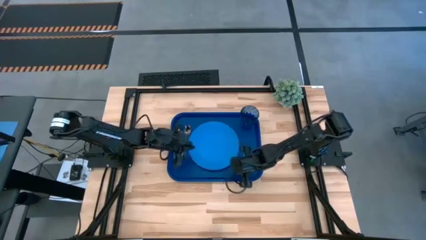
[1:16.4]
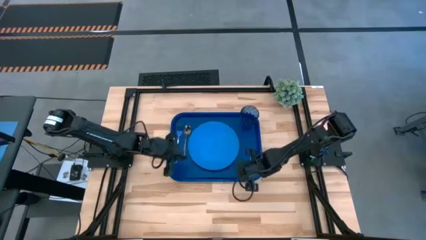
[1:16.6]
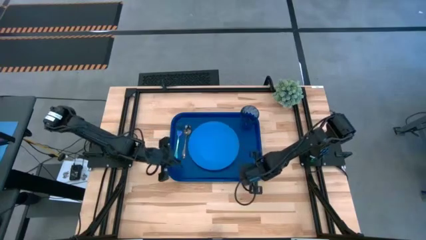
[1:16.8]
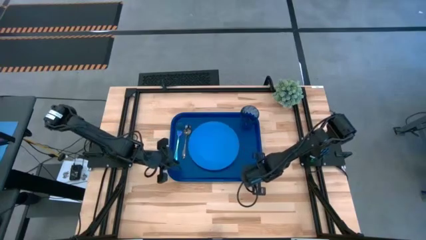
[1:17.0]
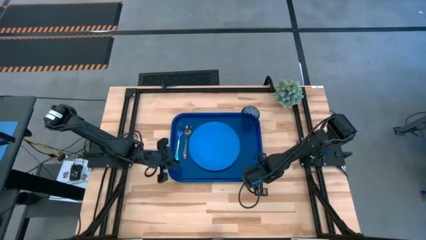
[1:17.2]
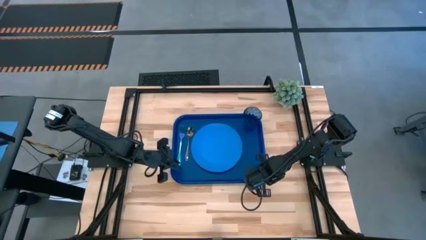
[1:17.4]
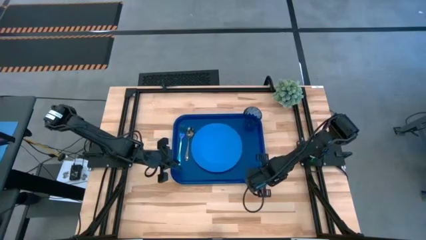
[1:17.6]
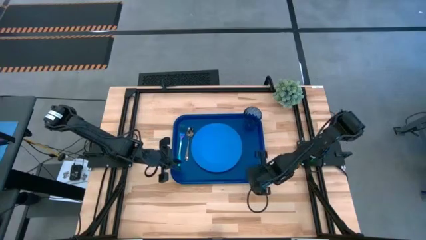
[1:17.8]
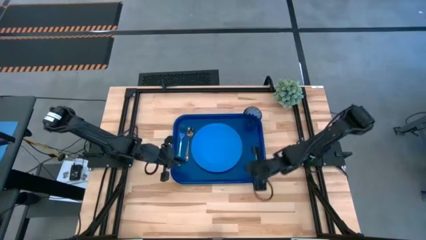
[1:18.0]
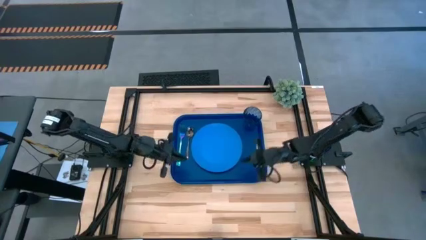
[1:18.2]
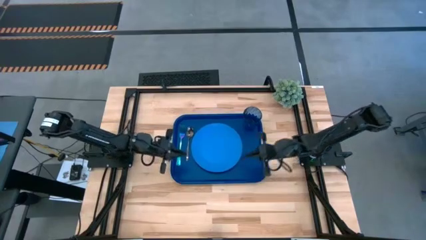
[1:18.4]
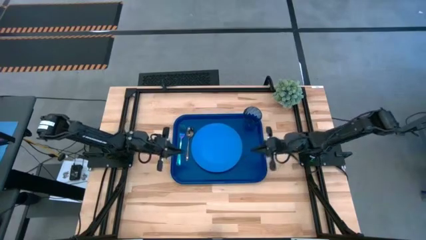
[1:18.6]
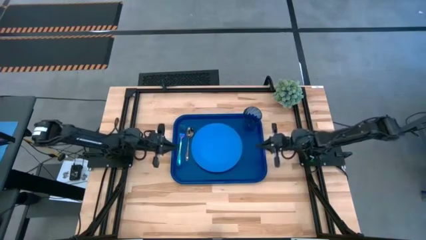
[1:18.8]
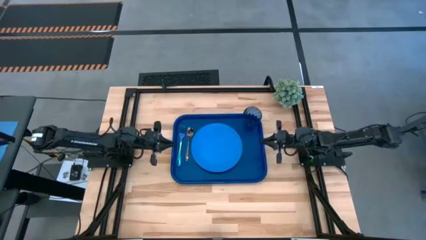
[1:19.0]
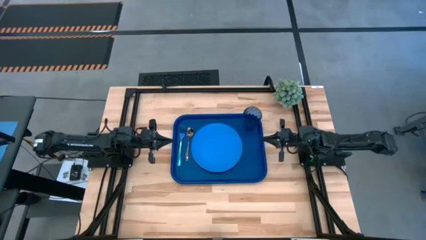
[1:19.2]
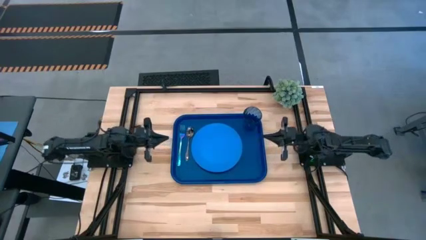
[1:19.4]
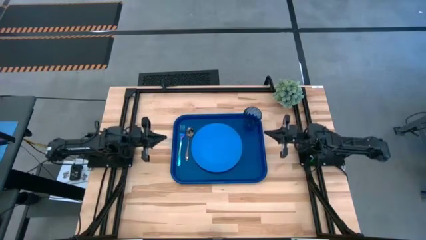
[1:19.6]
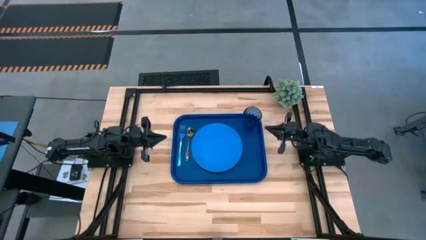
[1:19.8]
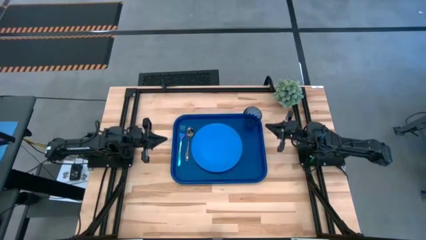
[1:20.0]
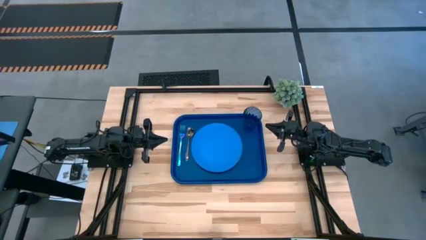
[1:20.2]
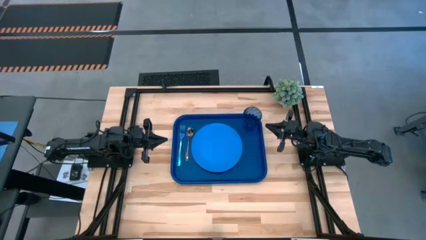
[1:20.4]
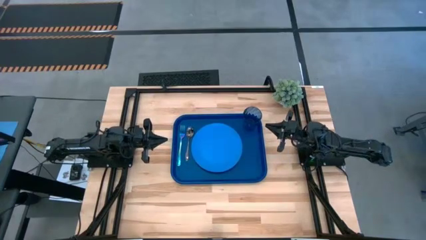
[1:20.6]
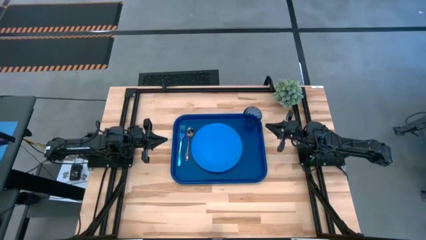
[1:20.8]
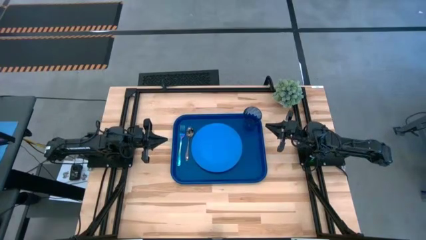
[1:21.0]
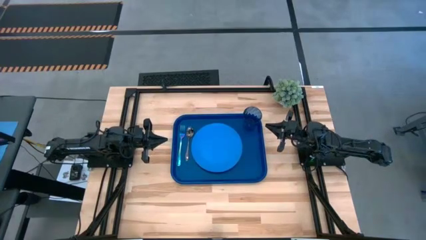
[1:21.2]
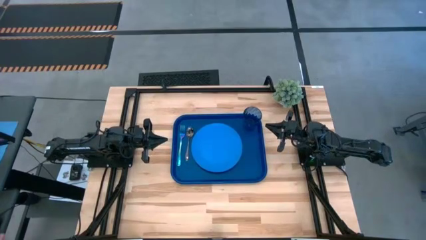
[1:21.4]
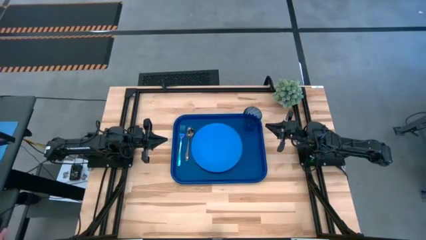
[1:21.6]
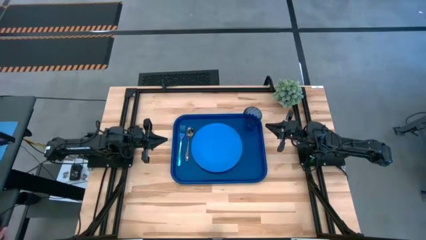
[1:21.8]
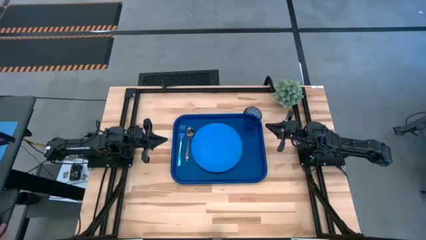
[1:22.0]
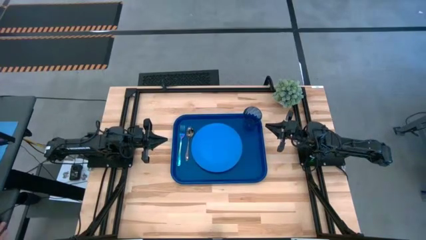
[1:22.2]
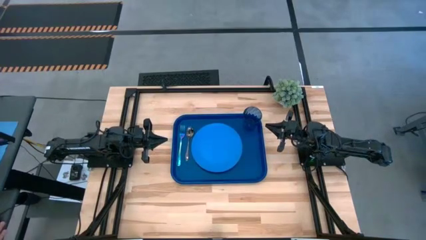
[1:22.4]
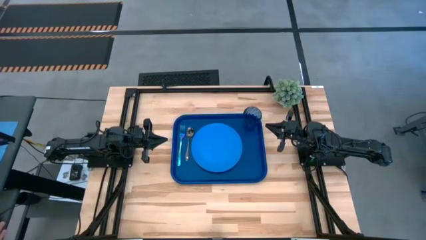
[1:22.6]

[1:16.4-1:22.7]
Task: Pick and place plate/cup/fork/spoon on tray
Return to Home Position

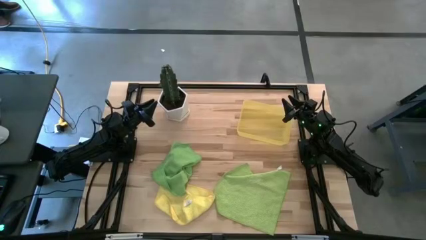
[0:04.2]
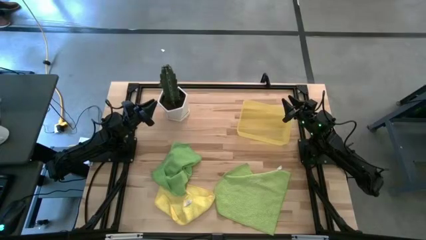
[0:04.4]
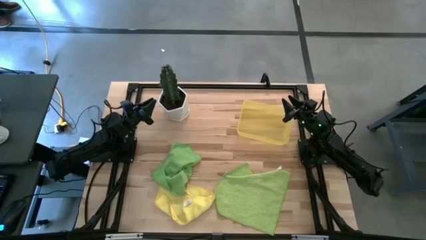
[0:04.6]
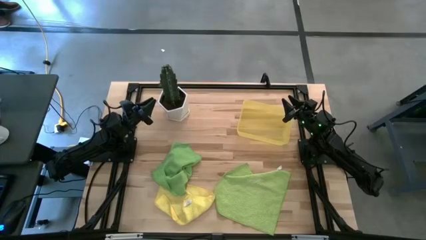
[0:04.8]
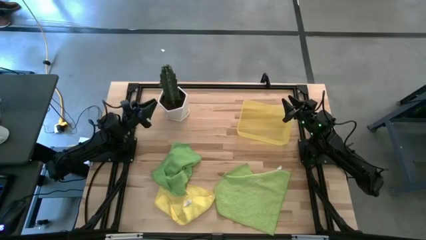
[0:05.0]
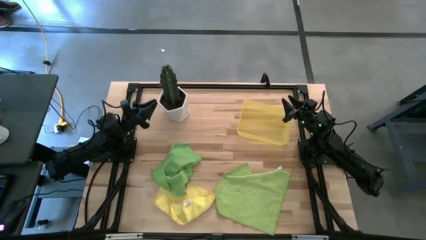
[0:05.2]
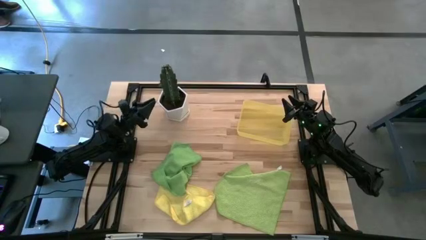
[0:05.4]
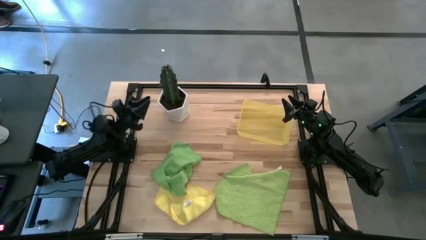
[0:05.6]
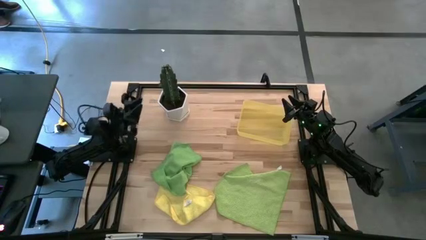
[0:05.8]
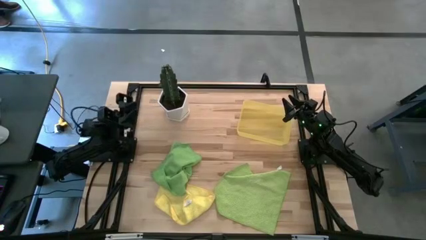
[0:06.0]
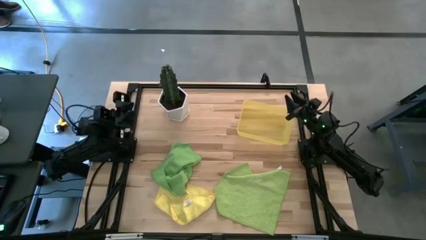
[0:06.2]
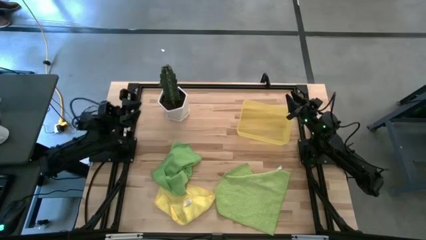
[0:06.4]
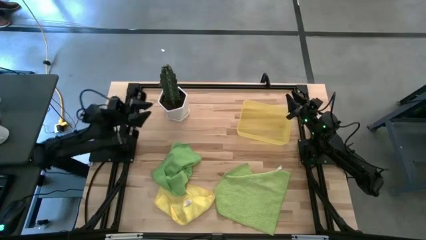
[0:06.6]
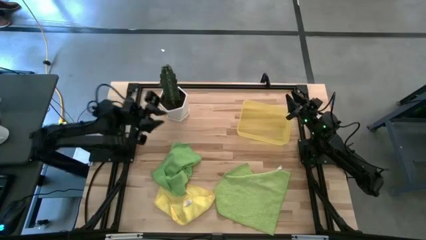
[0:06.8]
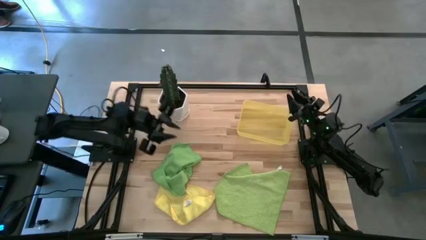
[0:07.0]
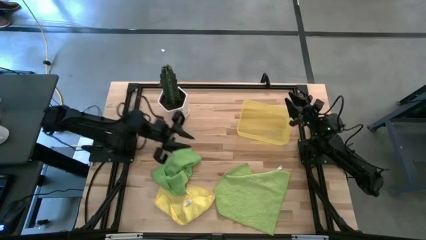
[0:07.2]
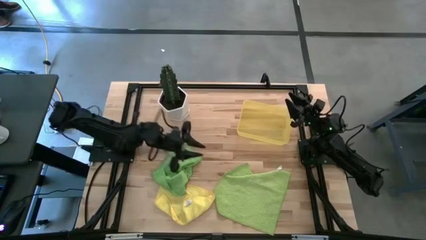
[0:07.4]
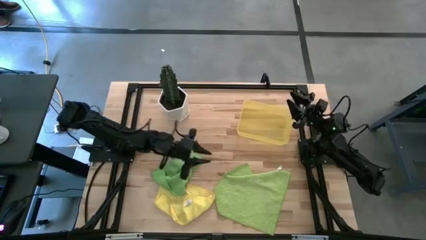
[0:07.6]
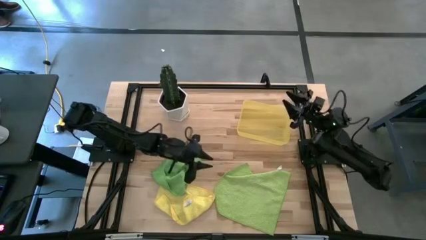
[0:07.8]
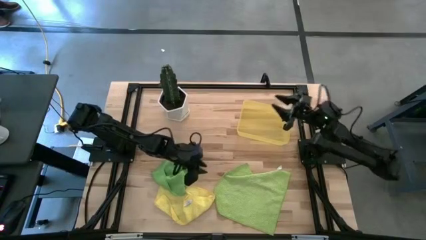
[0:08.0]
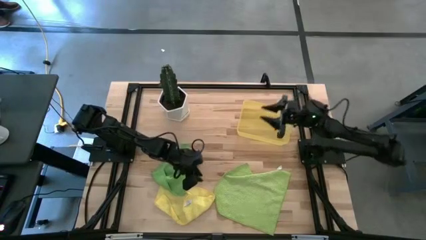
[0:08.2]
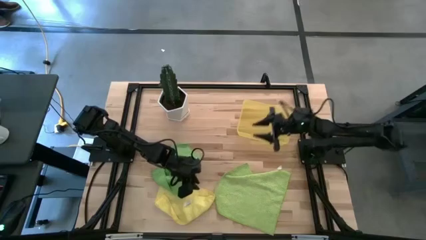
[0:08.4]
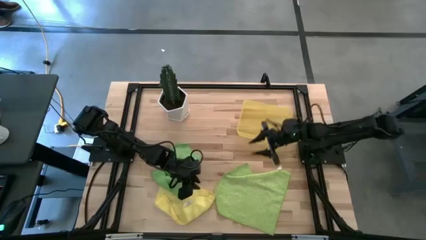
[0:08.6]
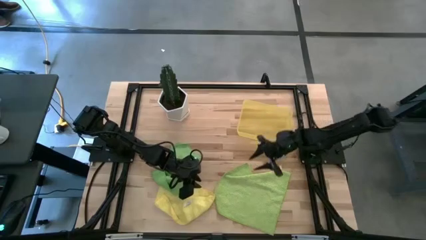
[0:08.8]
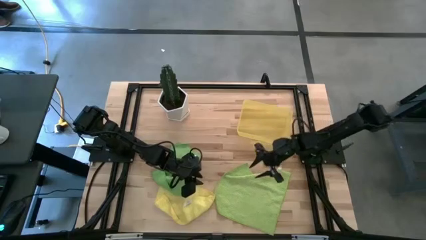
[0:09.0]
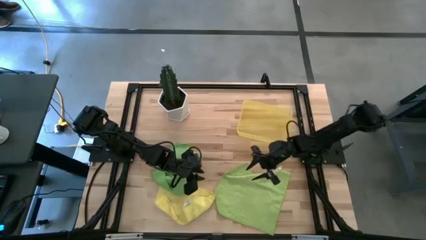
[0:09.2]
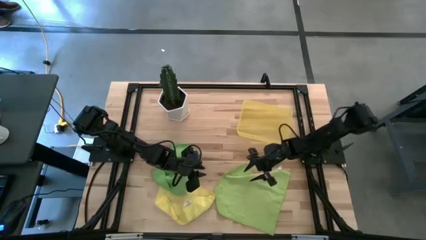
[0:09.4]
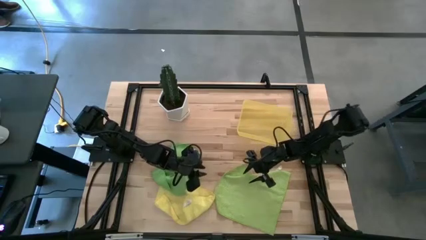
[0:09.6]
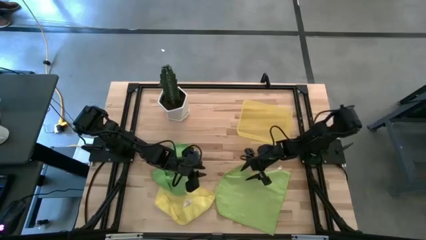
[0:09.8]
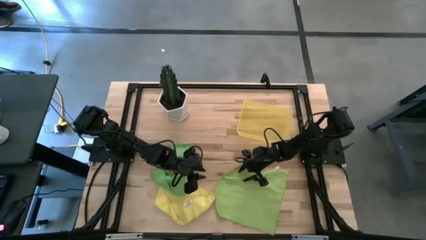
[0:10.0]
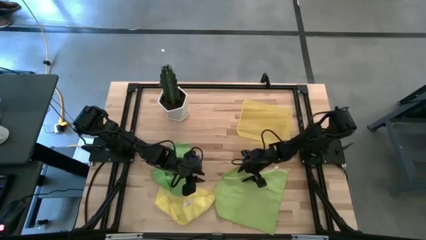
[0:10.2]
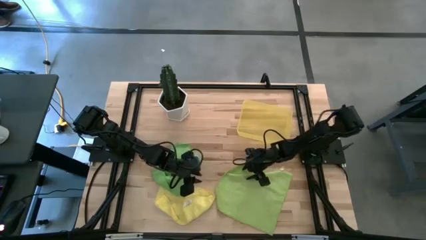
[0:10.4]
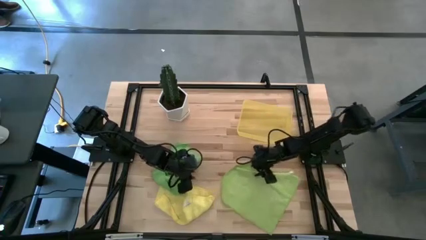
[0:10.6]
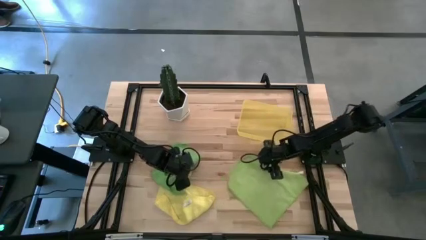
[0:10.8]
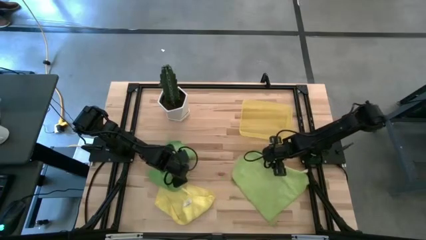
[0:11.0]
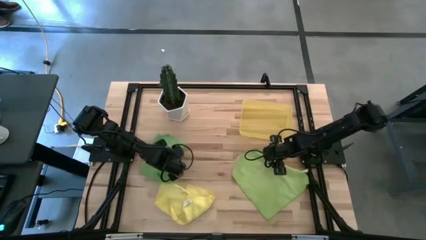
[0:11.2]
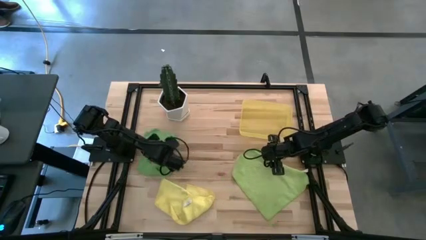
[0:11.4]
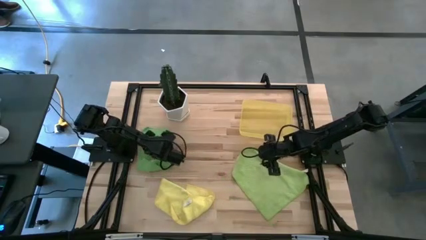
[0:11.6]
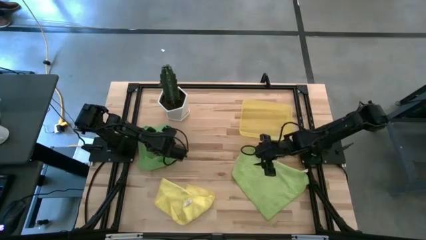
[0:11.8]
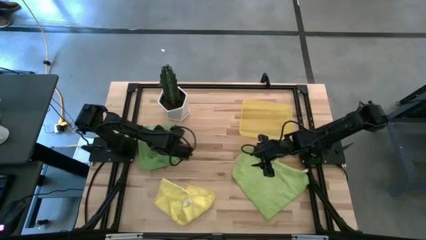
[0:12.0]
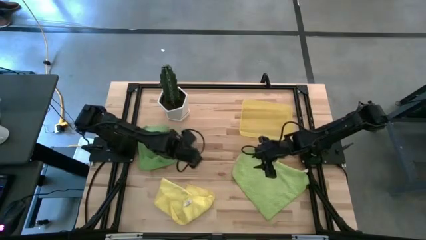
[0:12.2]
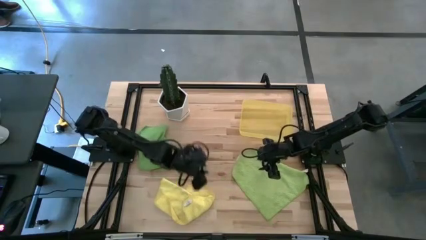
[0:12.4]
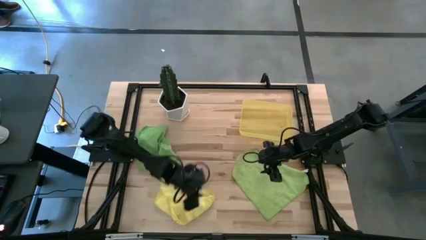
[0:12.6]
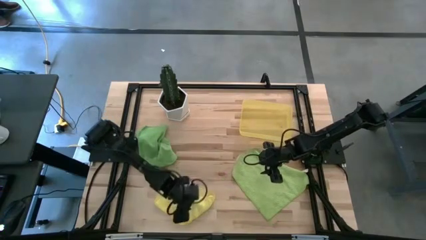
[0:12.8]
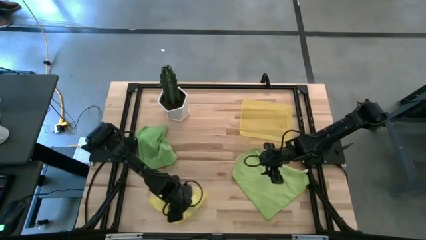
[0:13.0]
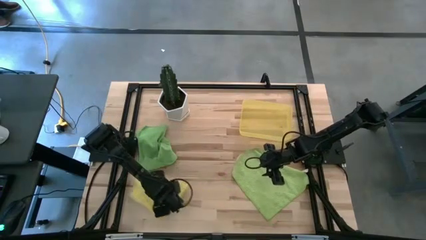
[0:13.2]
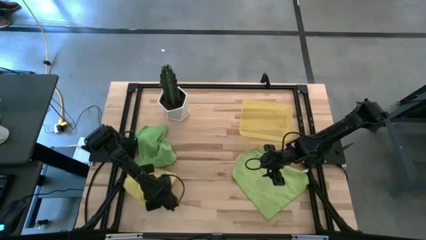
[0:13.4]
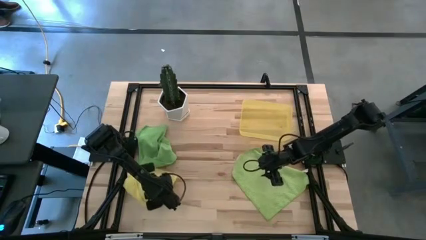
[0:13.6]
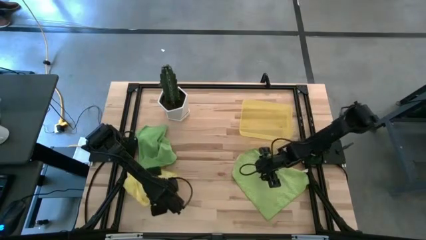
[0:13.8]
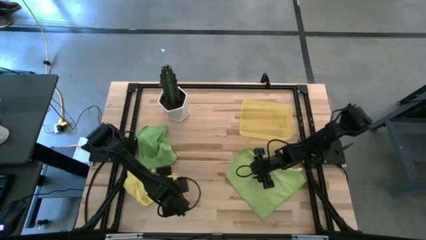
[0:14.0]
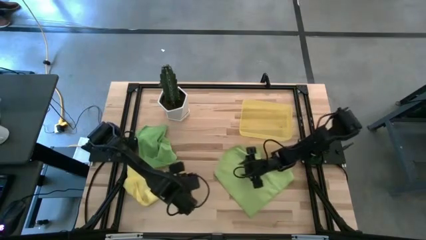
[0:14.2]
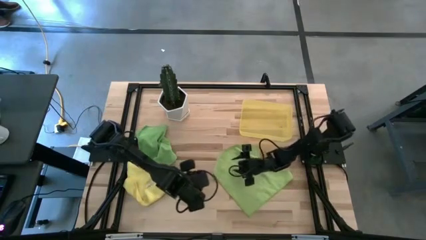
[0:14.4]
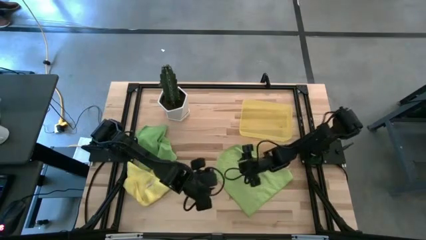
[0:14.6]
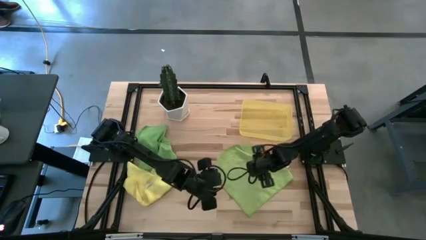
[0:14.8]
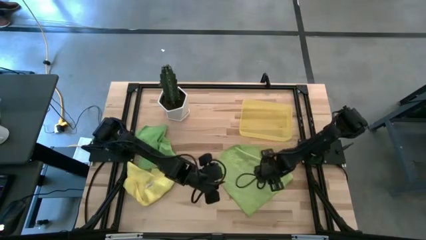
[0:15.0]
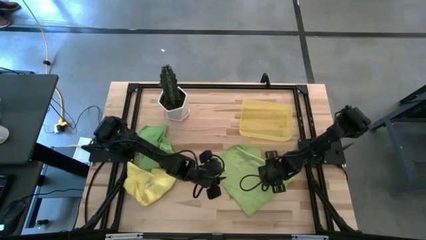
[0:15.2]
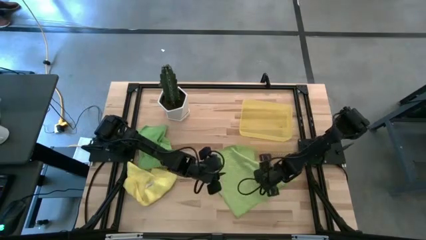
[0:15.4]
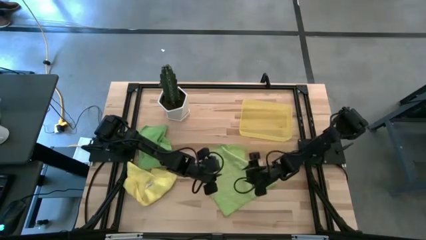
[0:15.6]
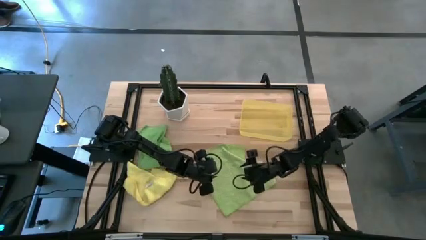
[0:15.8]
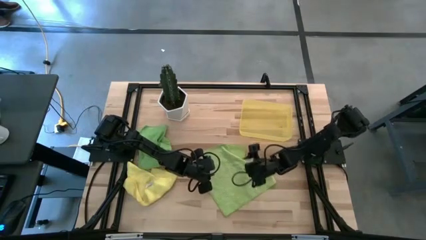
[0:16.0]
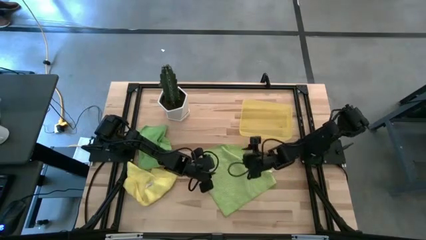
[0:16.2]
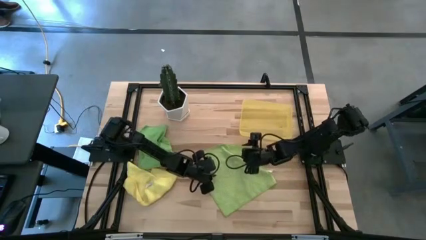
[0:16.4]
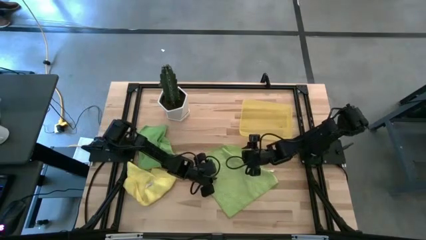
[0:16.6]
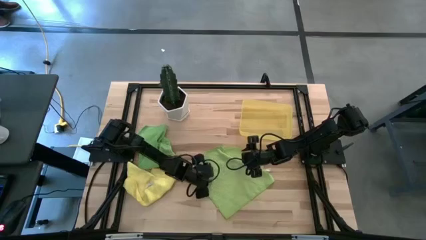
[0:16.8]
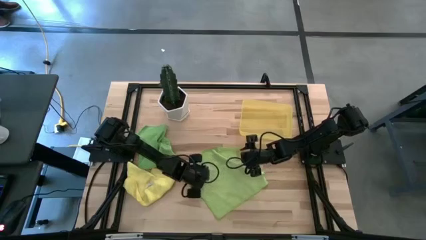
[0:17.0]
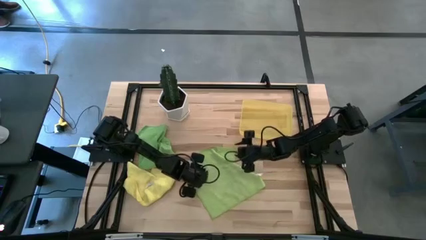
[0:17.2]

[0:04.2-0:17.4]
Task: Roll microfiber towels into tight, uniform cylinder then place into a basket
Fold the light green microfiber cloth
